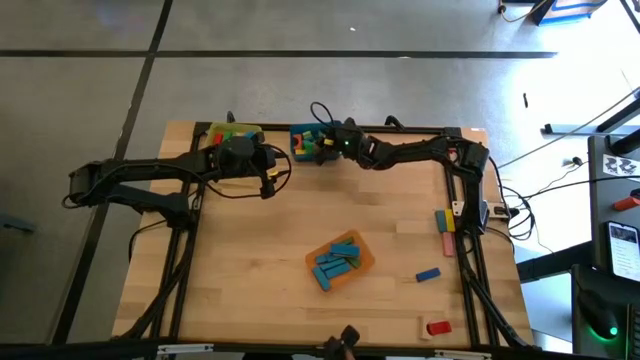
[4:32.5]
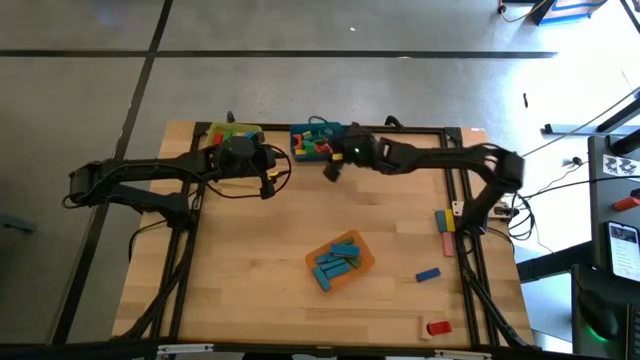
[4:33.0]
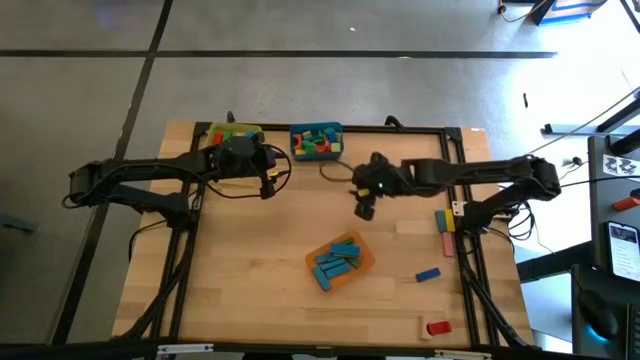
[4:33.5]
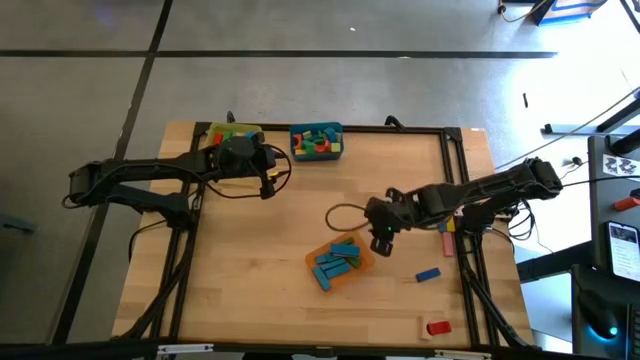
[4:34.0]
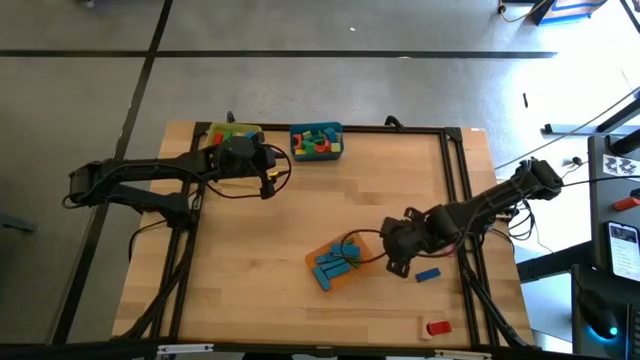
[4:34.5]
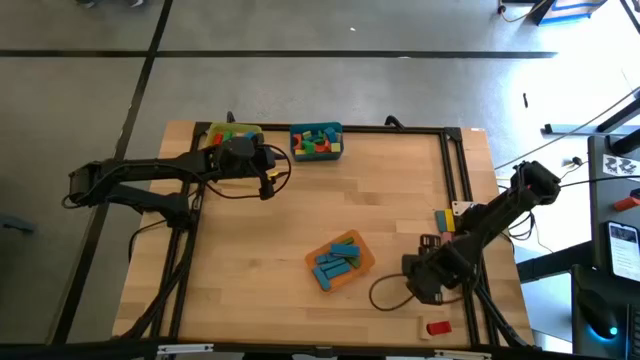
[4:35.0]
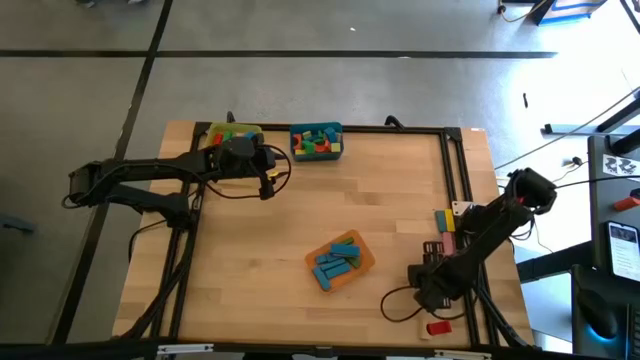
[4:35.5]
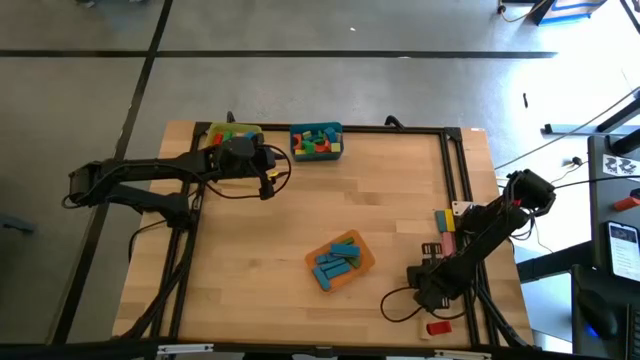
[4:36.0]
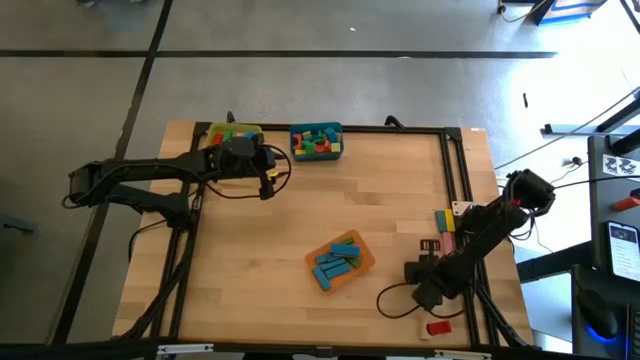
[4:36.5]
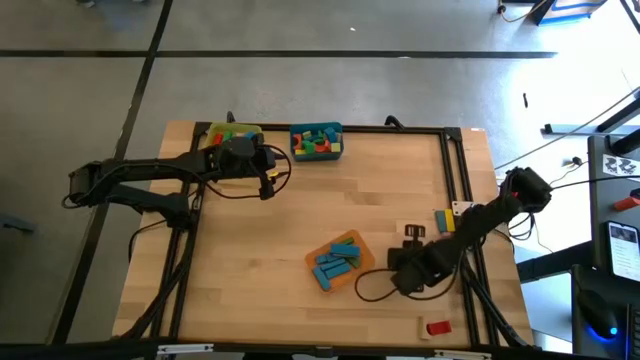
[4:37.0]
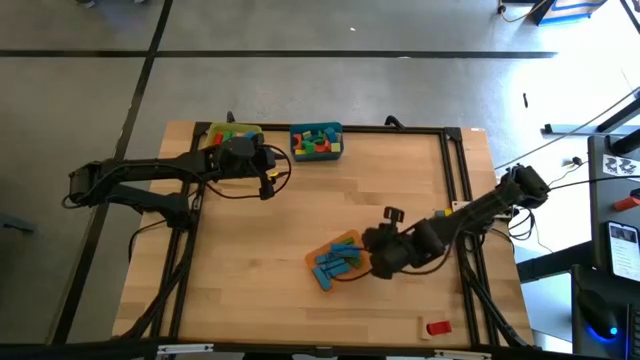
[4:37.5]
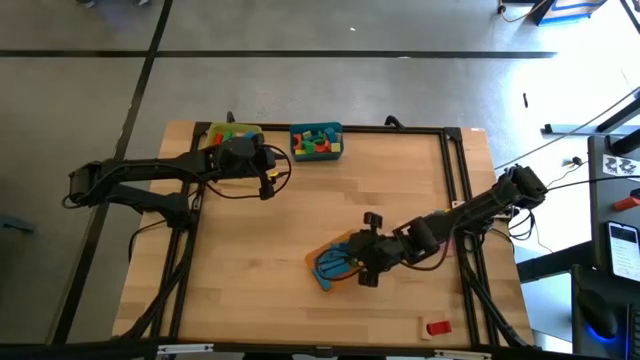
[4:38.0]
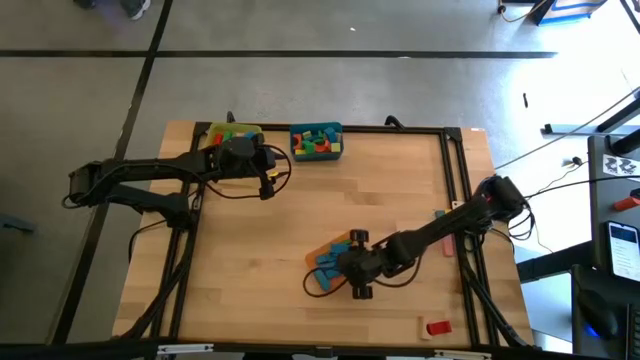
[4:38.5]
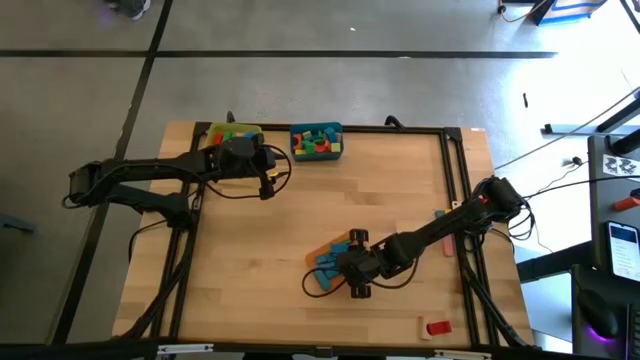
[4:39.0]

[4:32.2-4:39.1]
Task: Sort blocks by size
Put the dark blue rectangular block into the orange bin

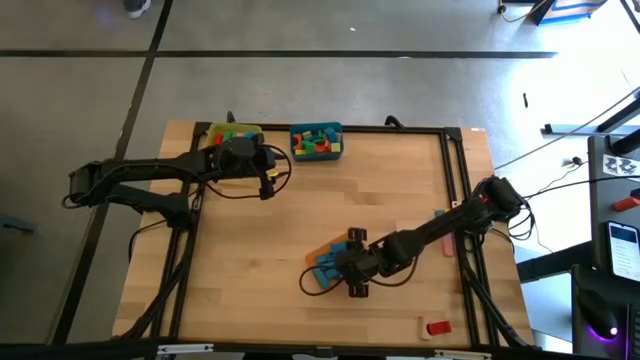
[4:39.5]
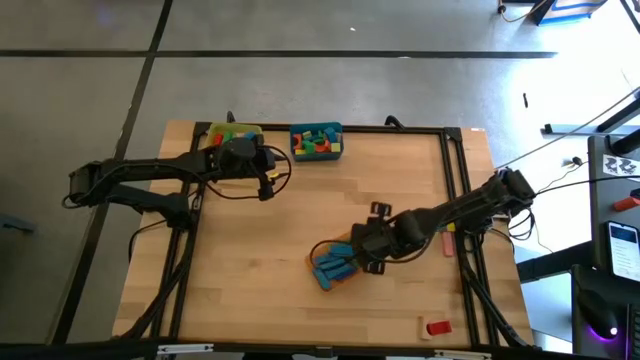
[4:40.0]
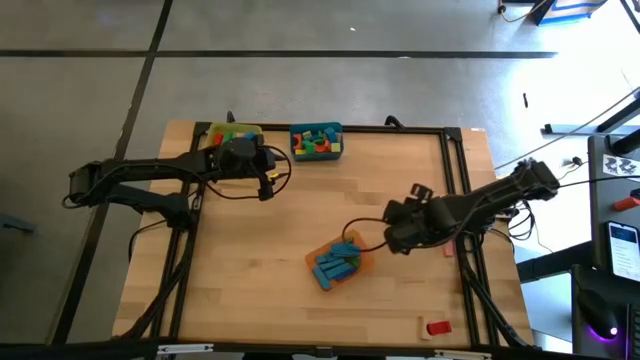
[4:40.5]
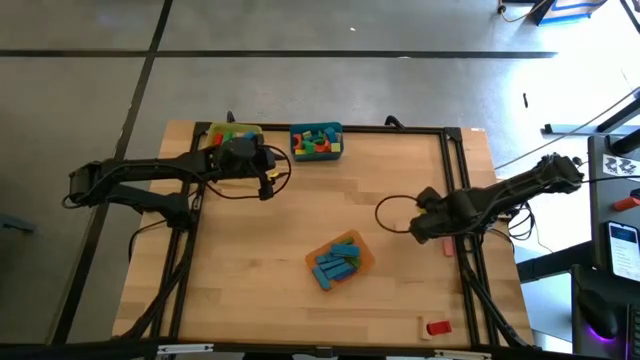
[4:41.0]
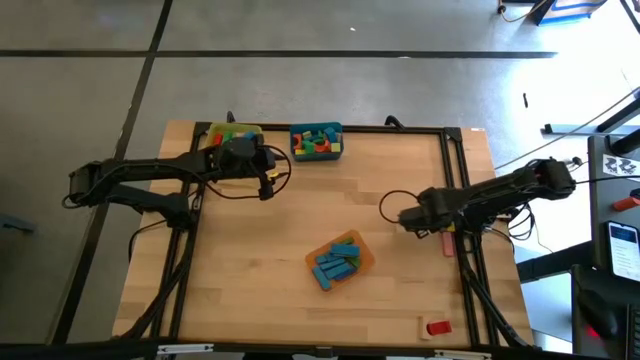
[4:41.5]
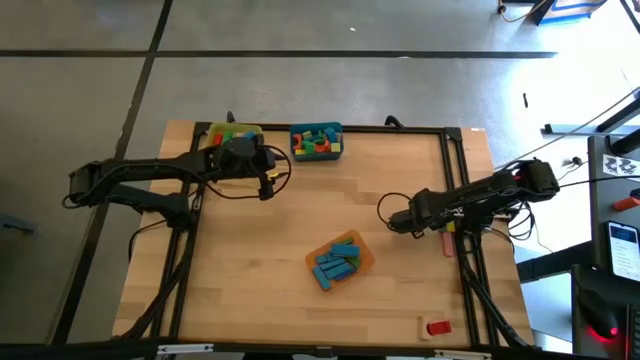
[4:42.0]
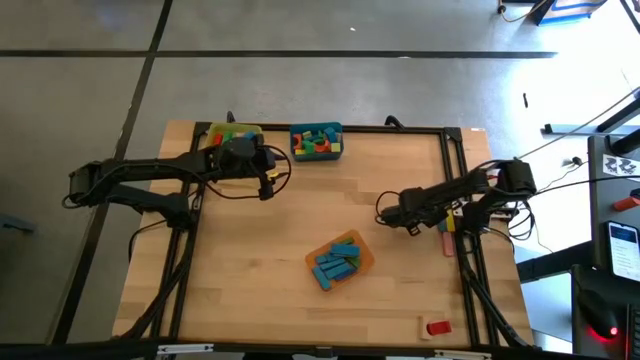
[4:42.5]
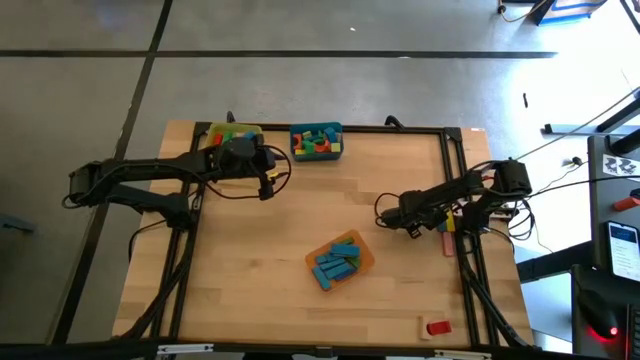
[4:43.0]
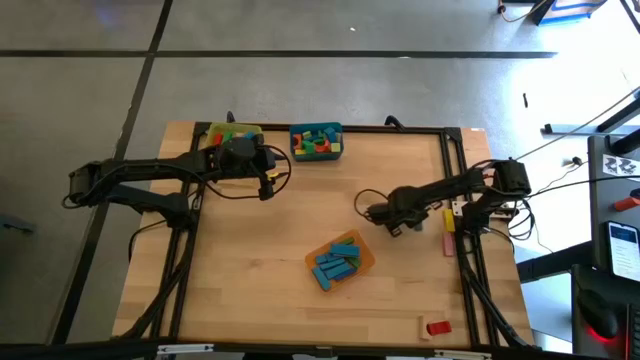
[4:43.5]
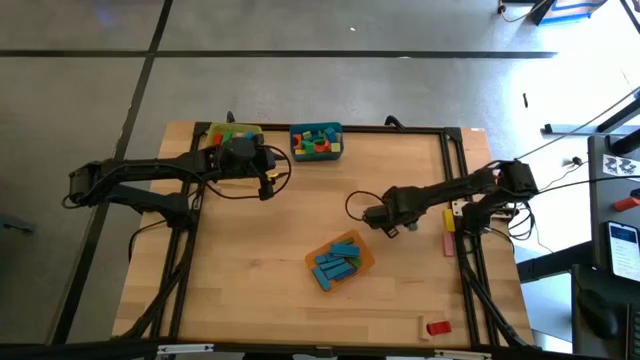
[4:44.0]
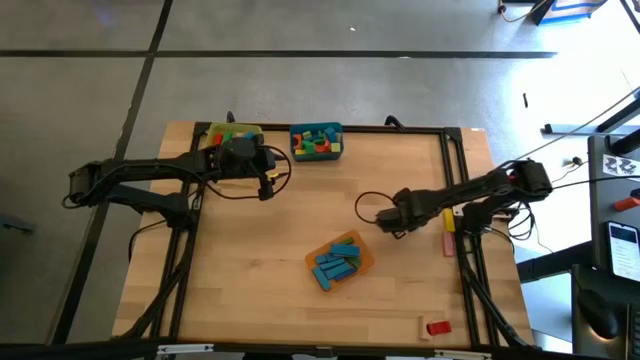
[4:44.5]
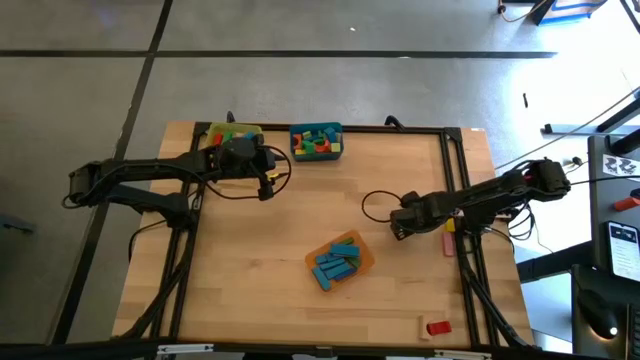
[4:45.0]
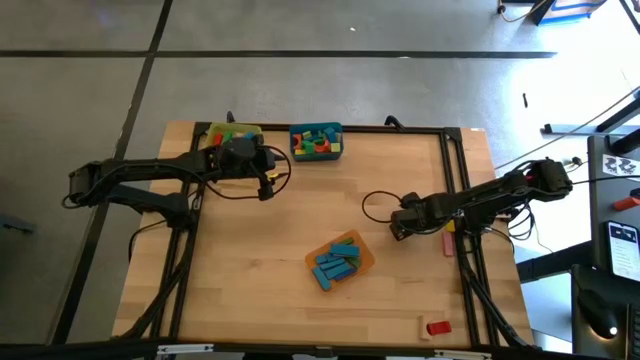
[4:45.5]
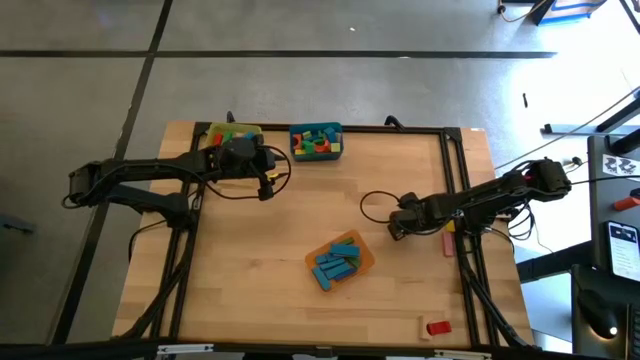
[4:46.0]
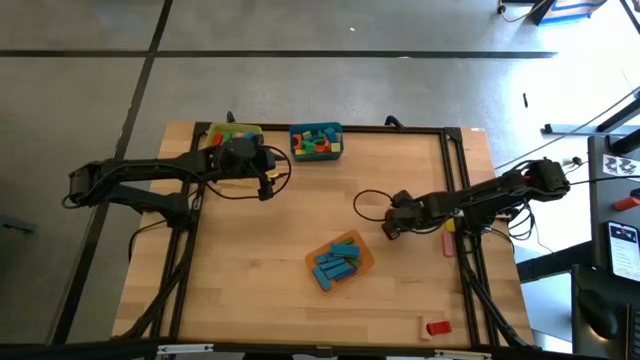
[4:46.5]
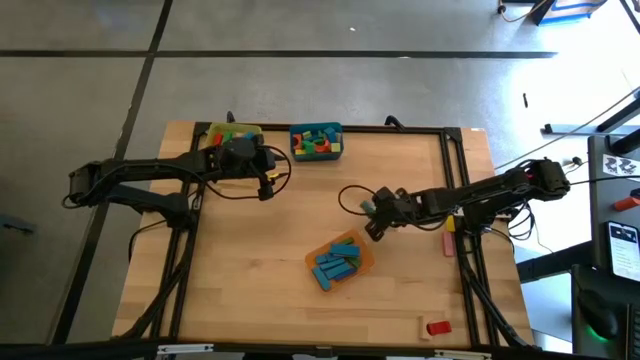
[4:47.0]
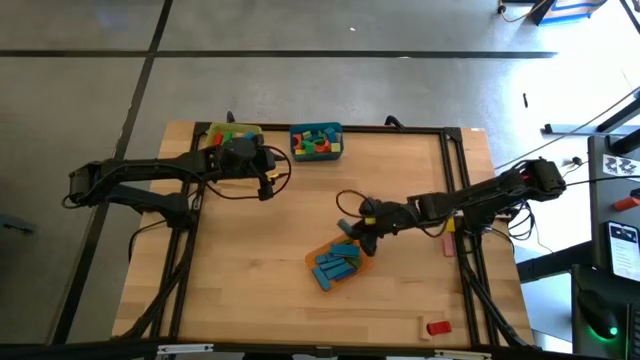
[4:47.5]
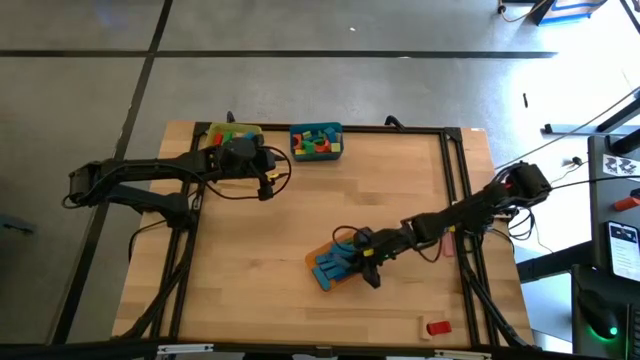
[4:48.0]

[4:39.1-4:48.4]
Put the blue rectangular block into the orange bin

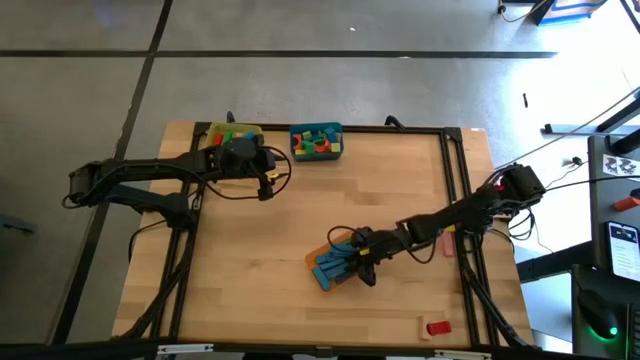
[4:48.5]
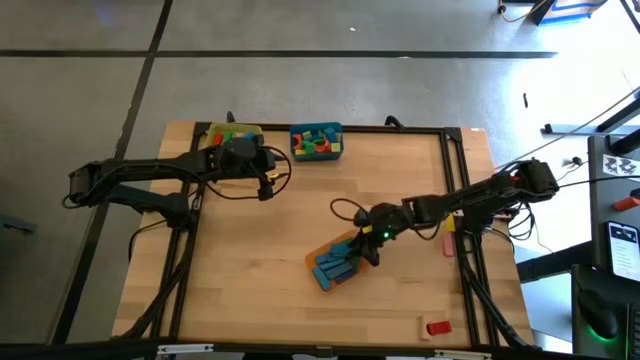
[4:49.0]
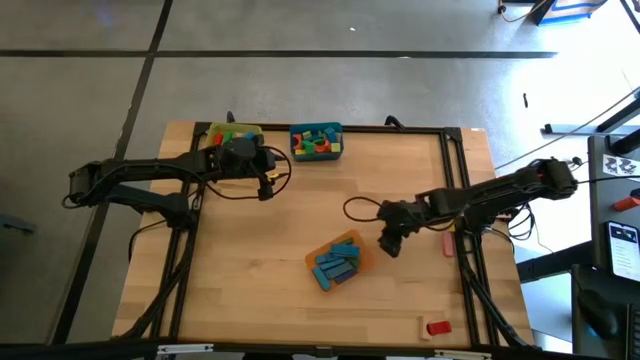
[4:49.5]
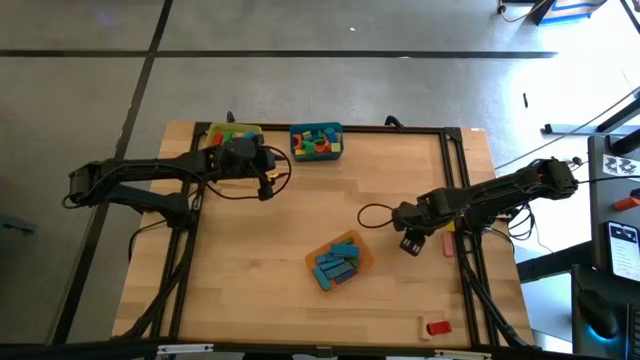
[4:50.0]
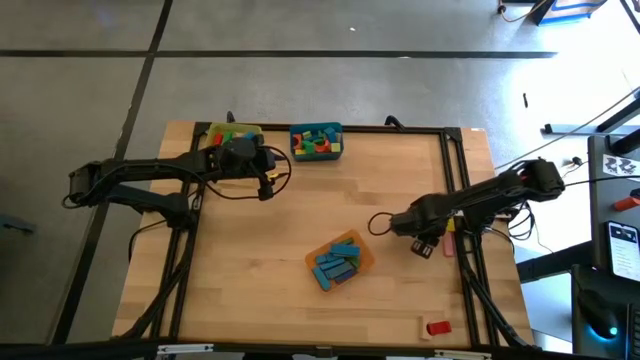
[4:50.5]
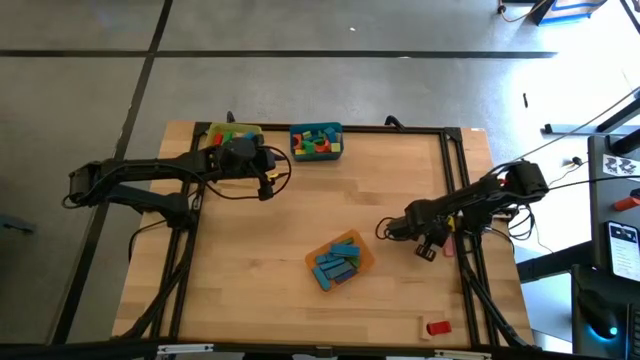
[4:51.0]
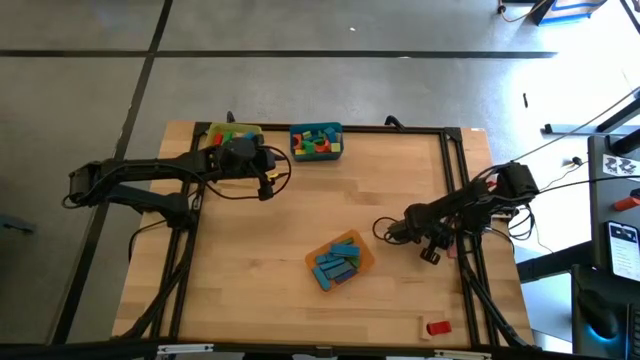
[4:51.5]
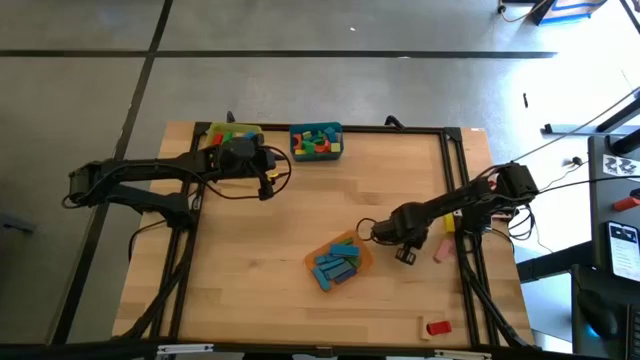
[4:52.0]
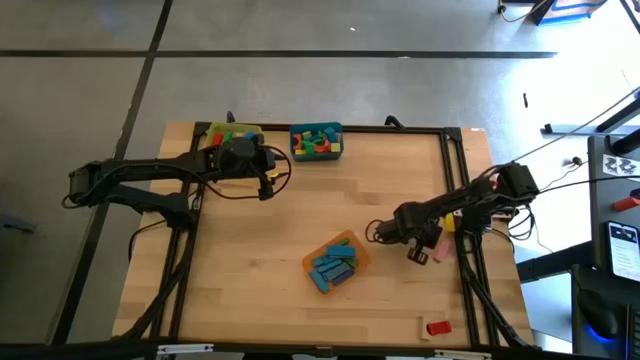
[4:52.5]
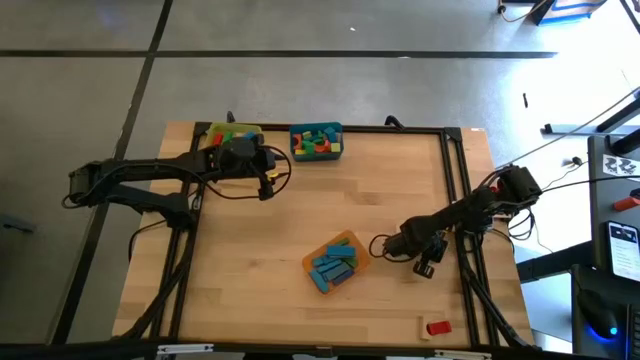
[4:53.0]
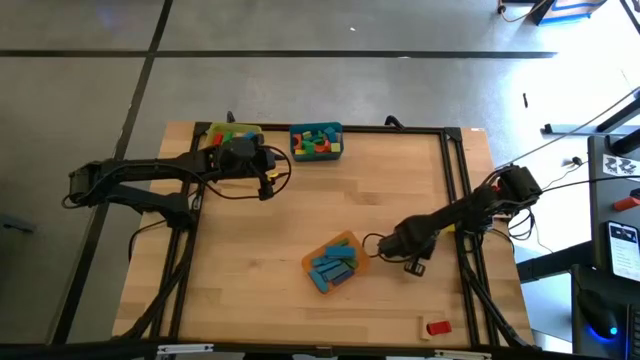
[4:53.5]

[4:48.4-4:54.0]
Adjust the pink rectangular block

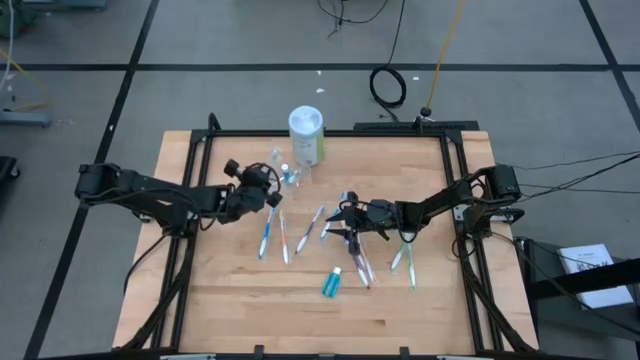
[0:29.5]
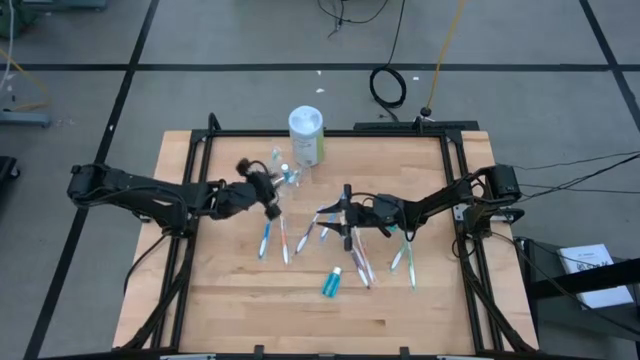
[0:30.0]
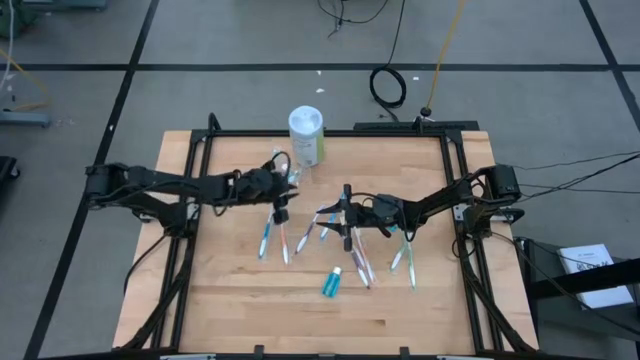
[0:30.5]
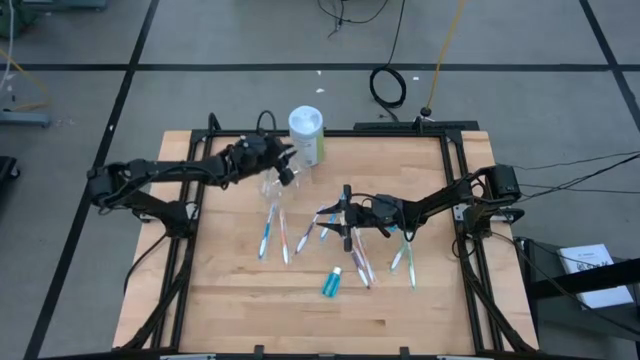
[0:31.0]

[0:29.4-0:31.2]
Task: Pick & Place toothbrushing station
Adjust the green toothbrush in the transparent organizer
